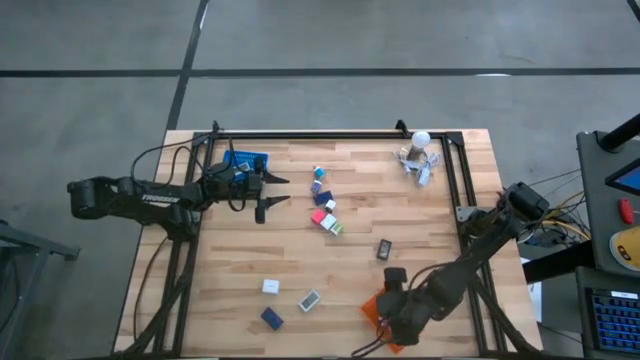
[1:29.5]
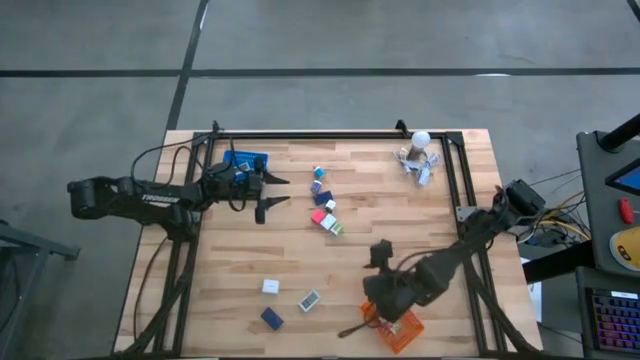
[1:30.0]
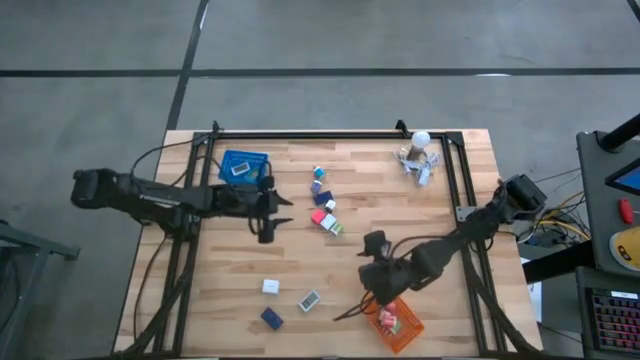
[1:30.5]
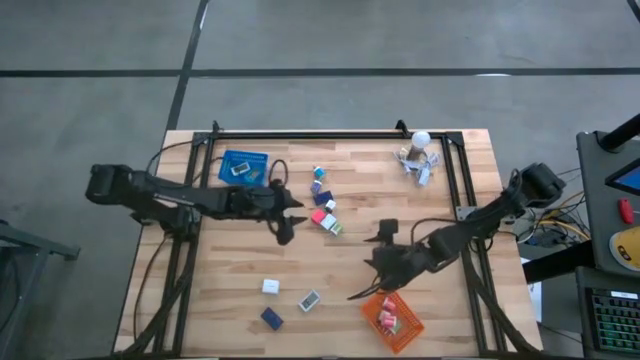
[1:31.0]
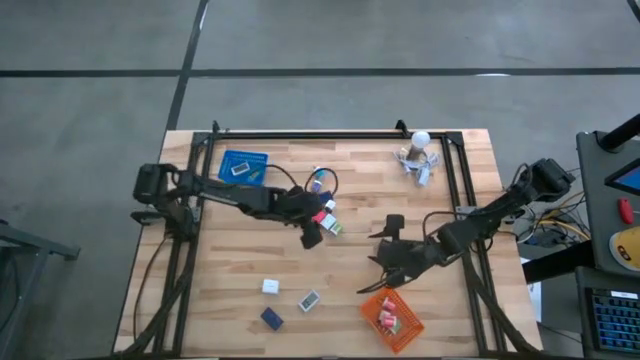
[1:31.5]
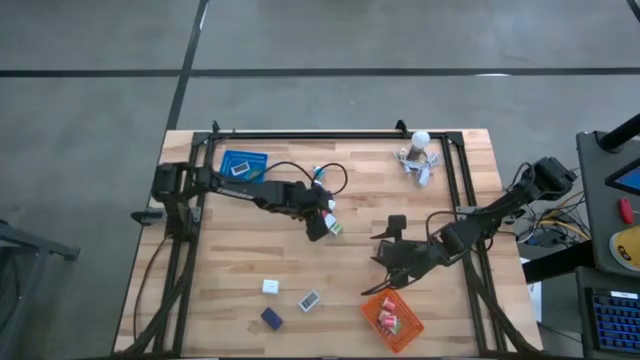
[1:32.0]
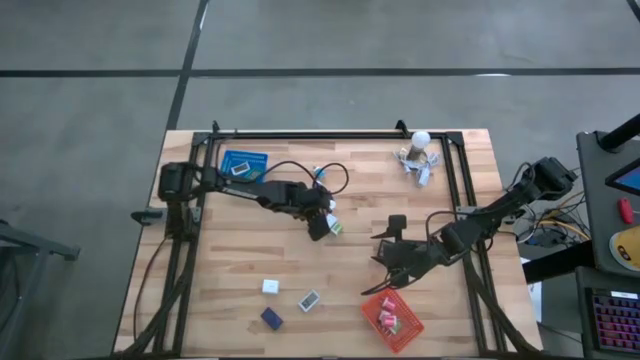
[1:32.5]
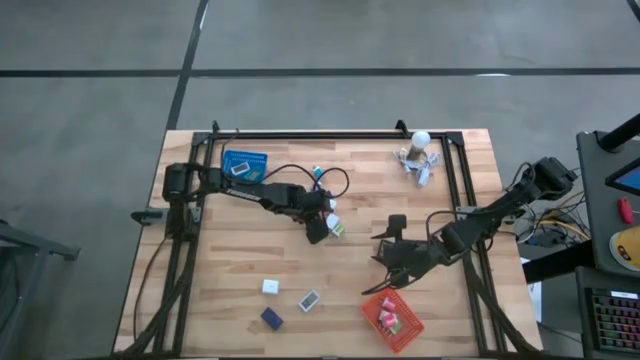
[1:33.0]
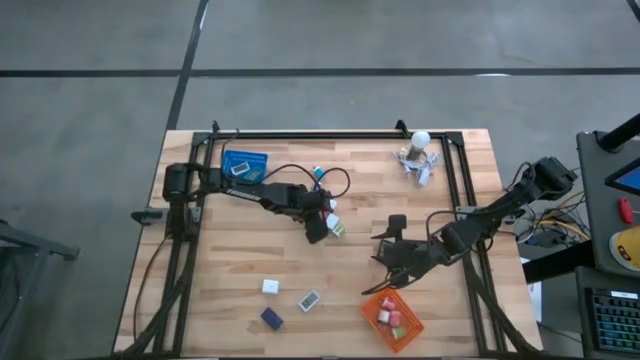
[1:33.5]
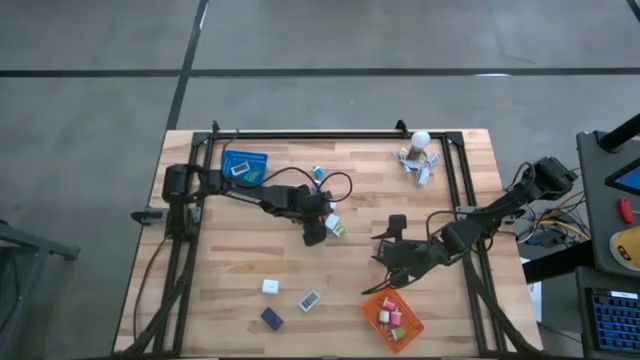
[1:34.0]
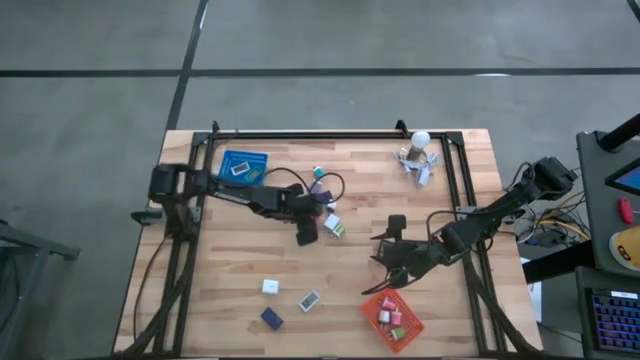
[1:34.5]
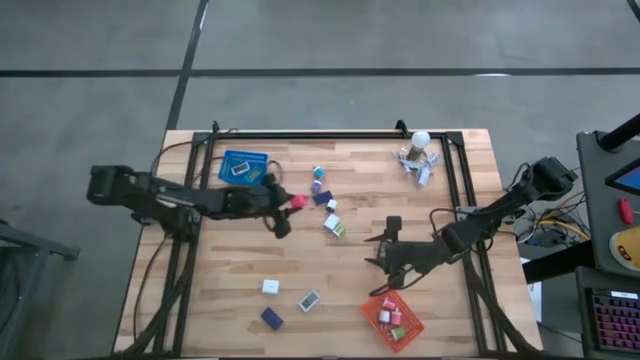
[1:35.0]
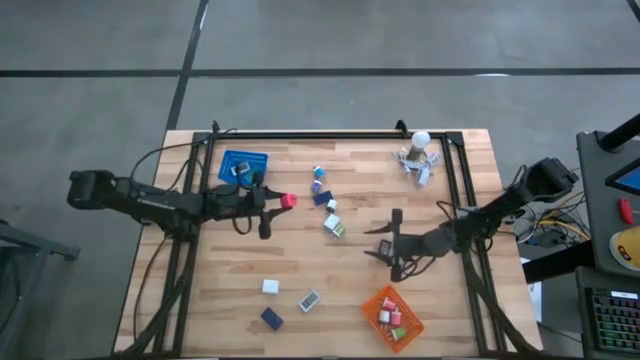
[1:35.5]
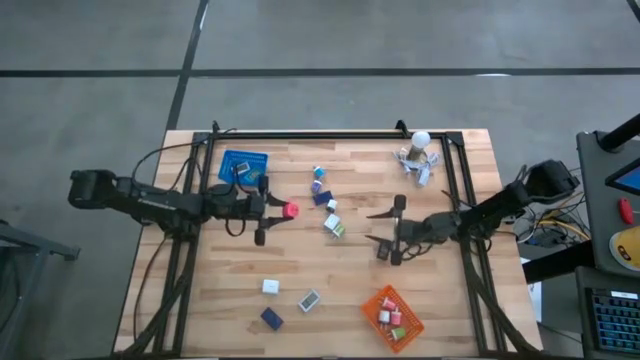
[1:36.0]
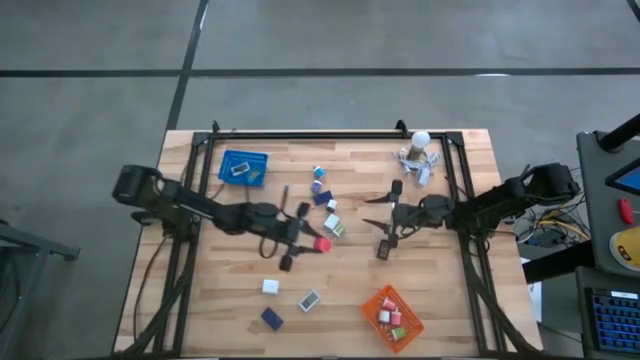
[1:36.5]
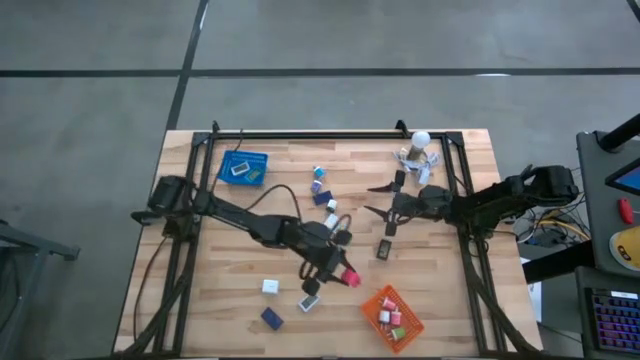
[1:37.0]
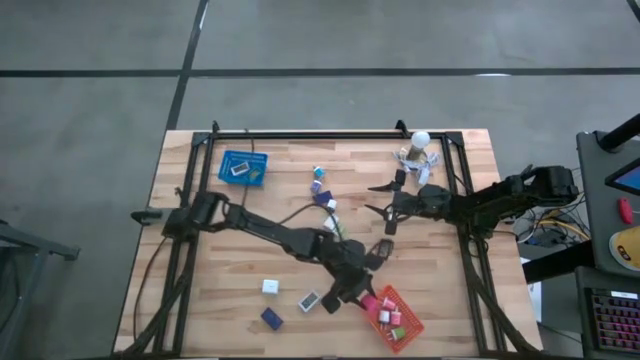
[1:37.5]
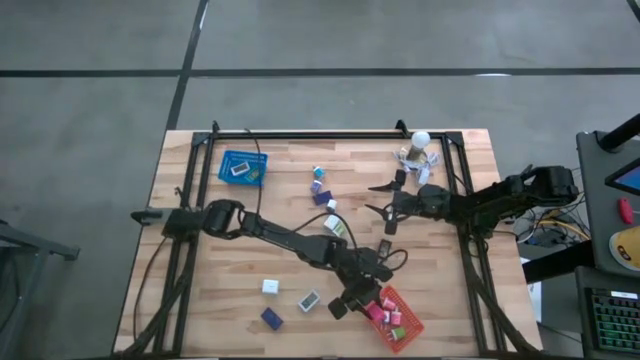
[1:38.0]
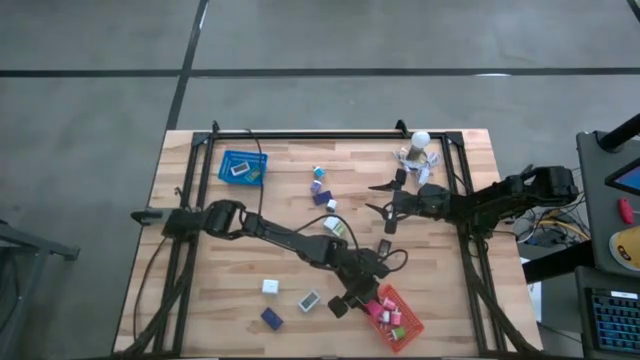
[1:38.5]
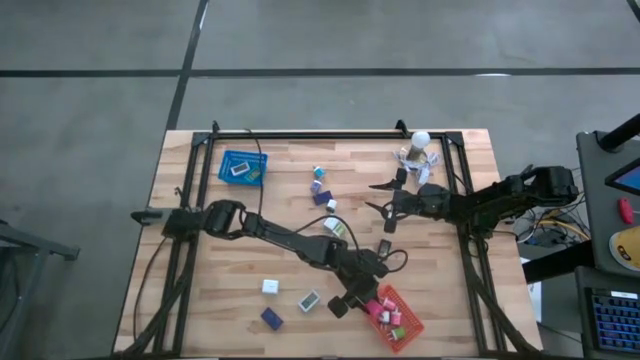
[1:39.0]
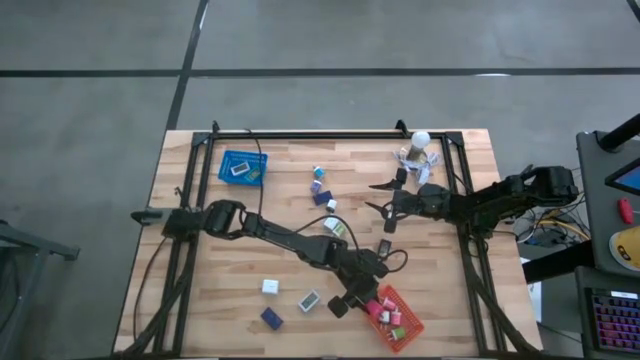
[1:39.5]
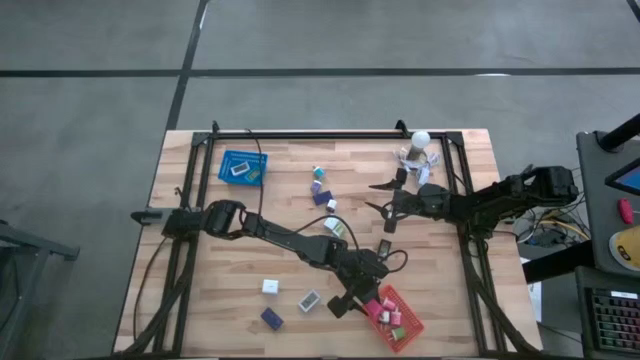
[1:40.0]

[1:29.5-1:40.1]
Task: Pick & Place Office items
Put the pink charger adapter into the orange bin

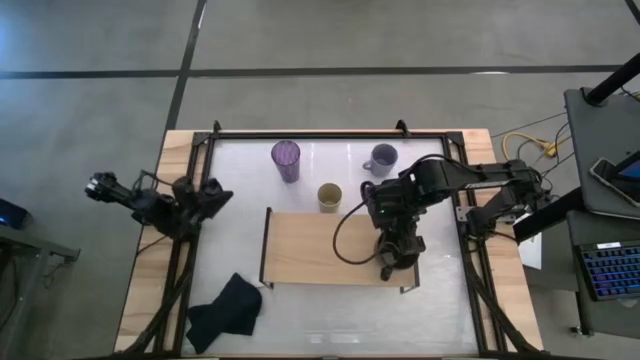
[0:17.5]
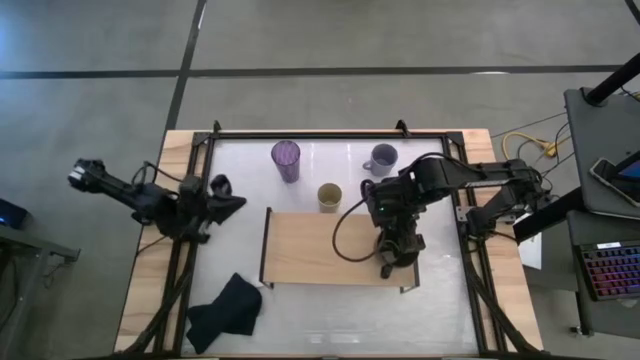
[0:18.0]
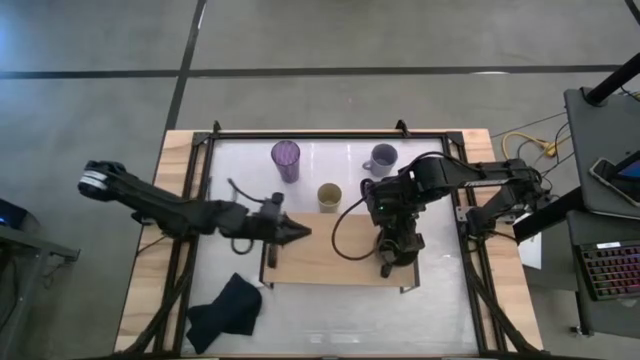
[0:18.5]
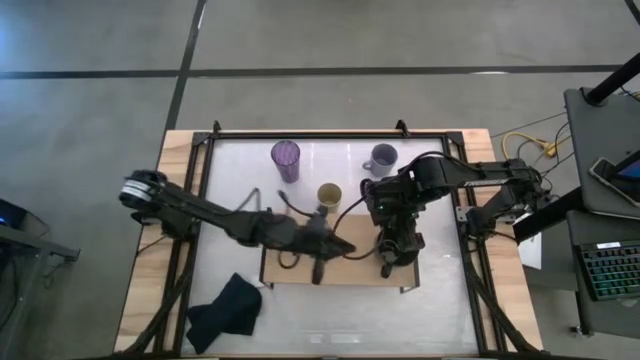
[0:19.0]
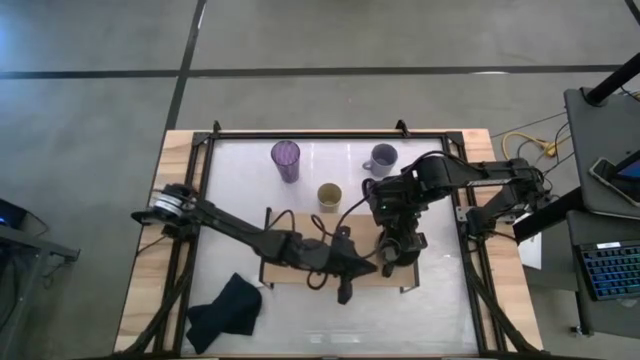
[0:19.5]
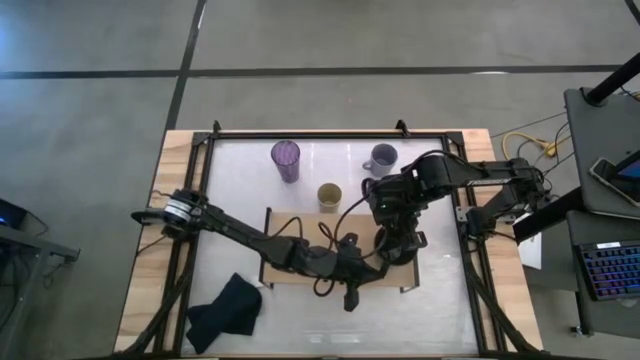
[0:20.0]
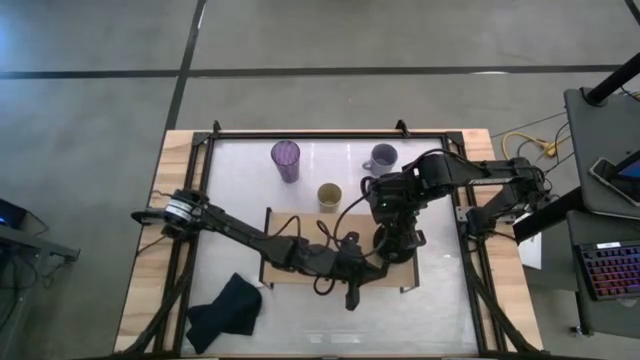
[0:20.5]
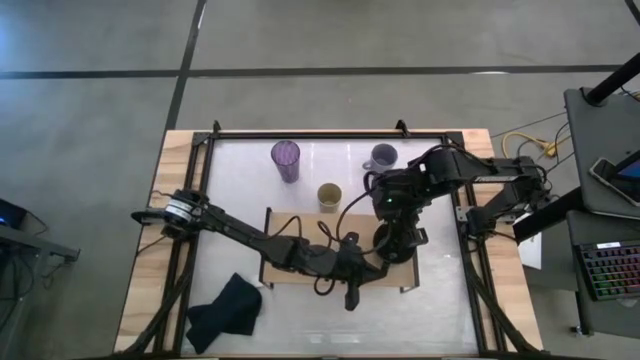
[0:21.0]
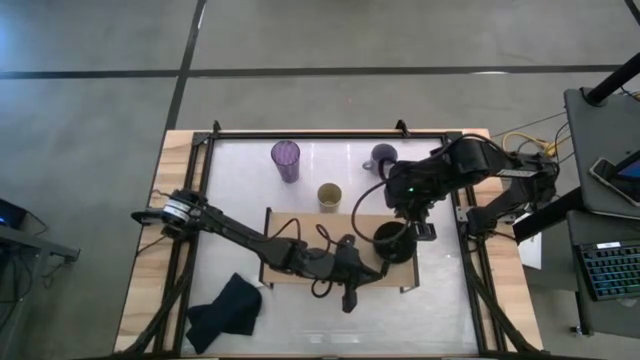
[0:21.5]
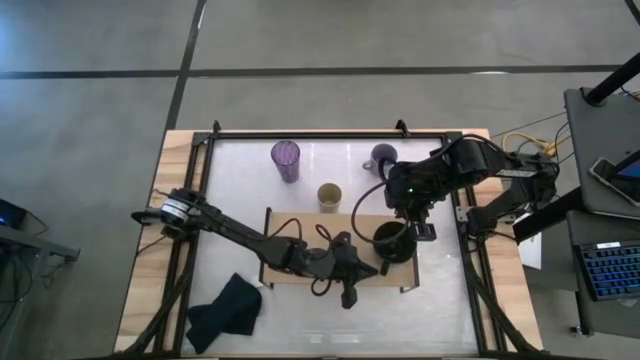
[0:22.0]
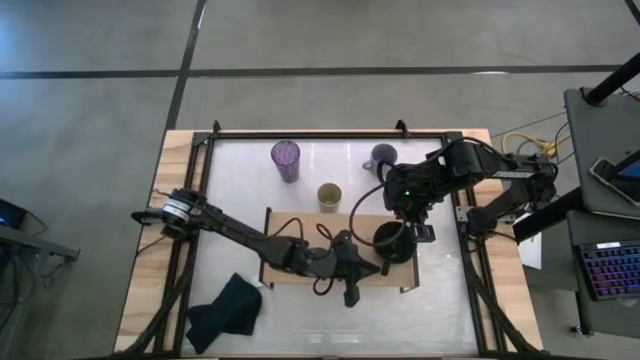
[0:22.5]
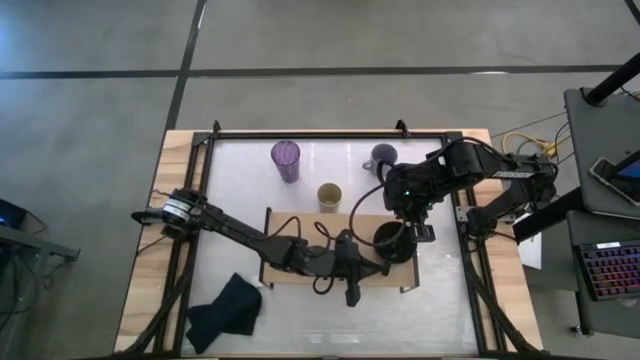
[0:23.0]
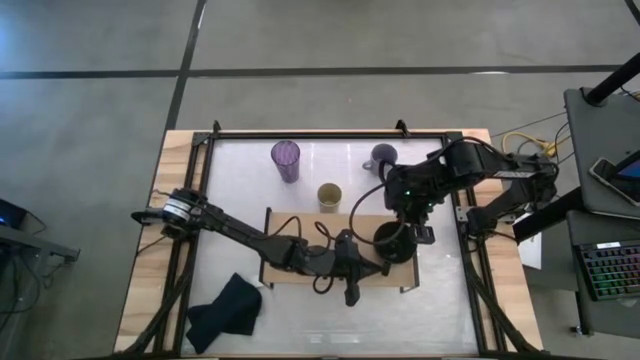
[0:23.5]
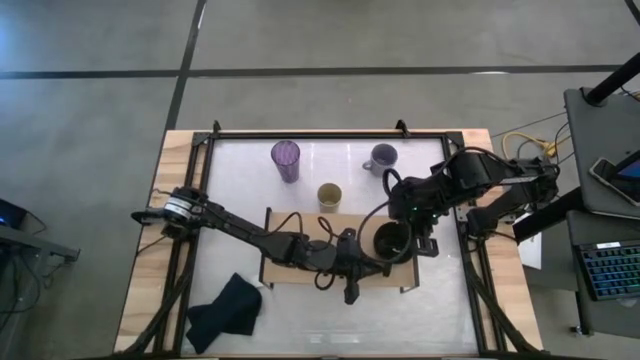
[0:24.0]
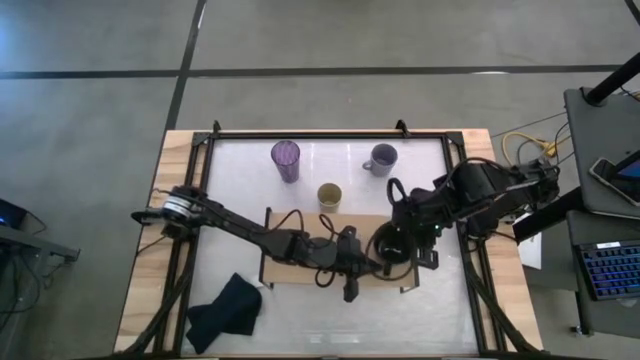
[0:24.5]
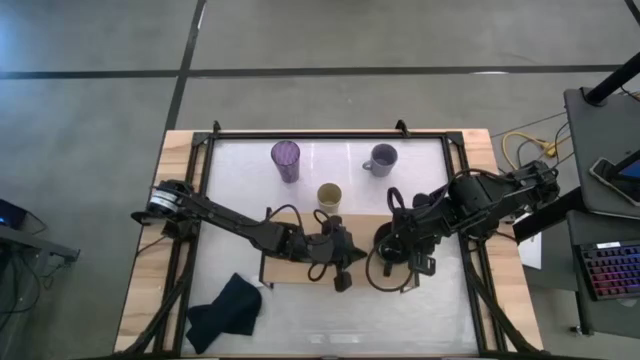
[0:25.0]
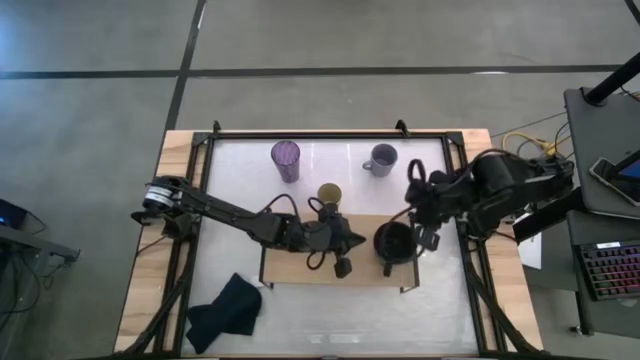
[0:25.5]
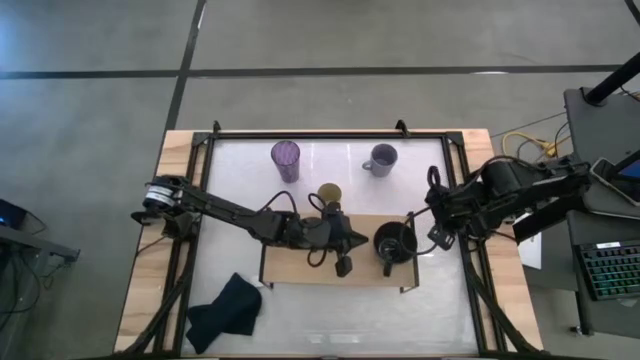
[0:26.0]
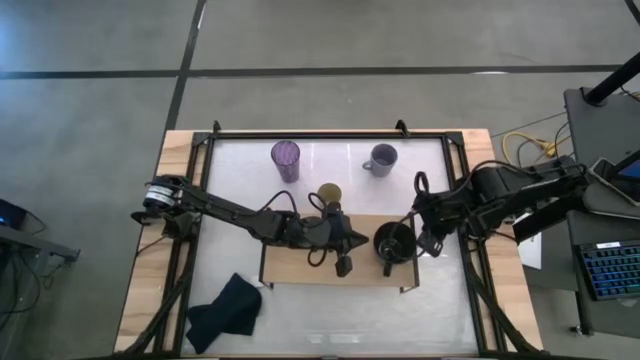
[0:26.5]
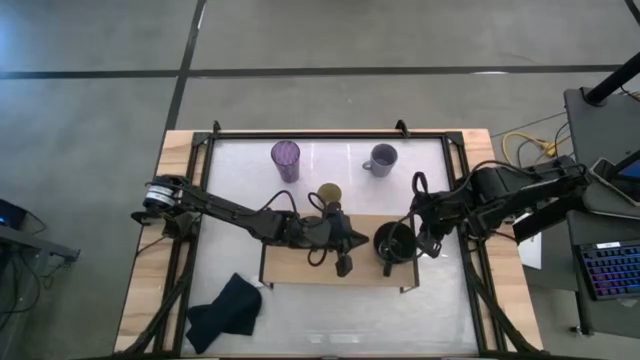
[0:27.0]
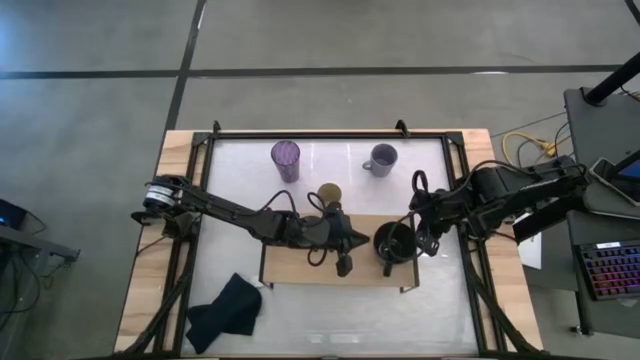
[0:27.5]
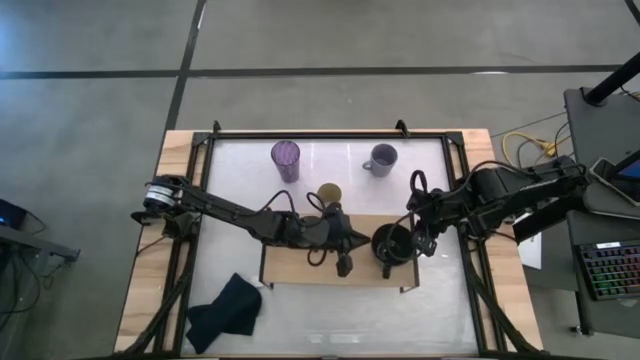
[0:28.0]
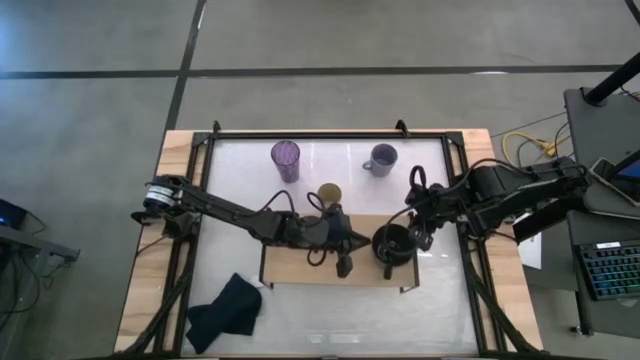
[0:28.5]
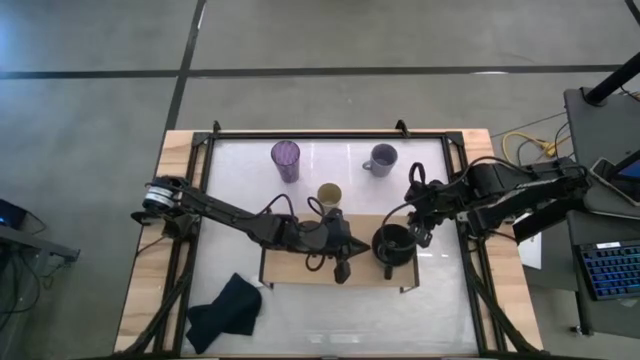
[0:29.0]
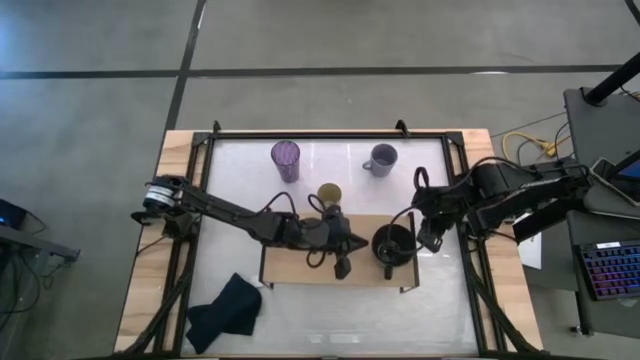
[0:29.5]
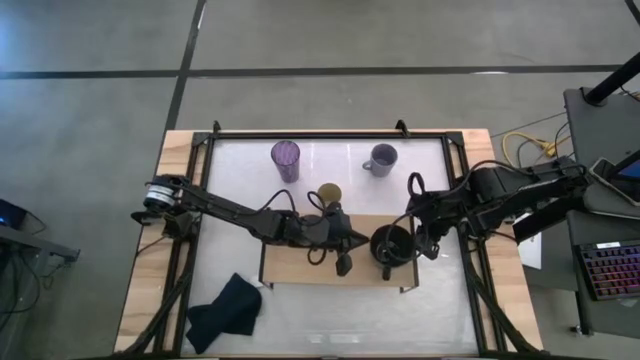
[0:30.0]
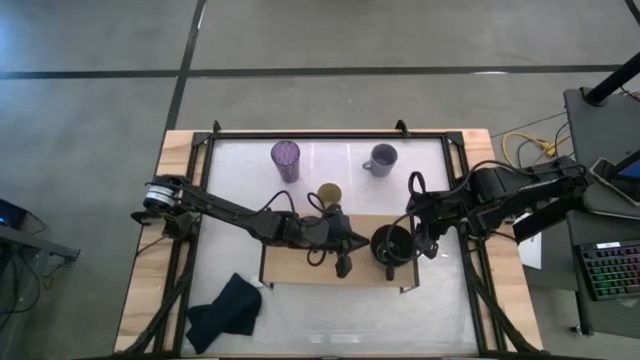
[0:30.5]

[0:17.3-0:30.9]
Task: Stack small to large cups/mugs on shelf
Put the black mug on the shelf
